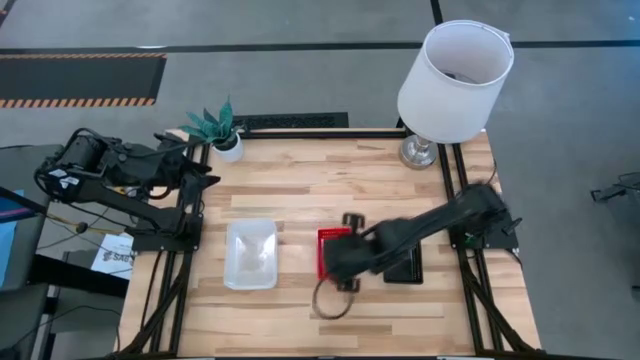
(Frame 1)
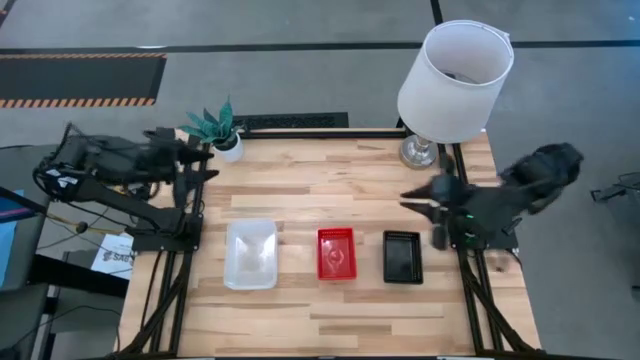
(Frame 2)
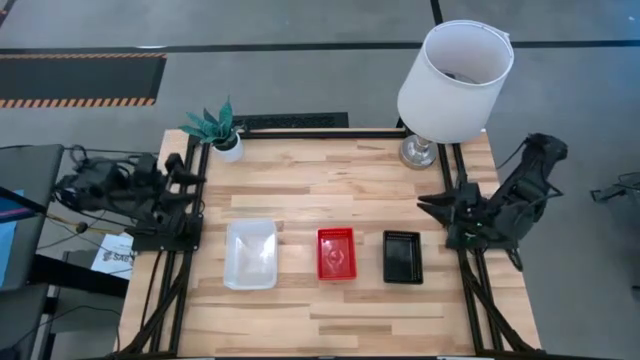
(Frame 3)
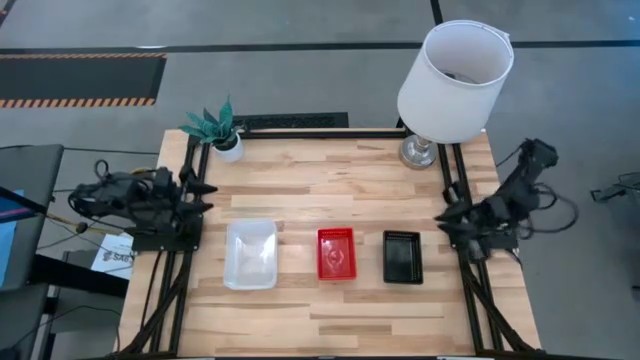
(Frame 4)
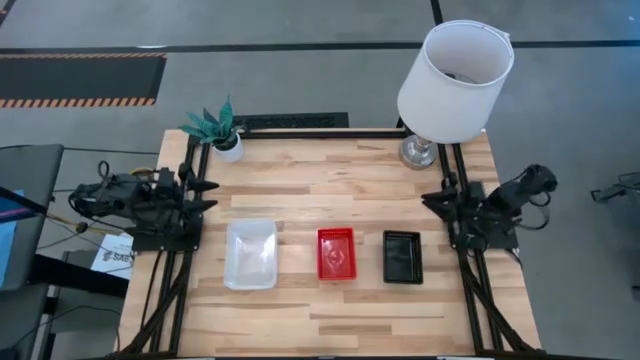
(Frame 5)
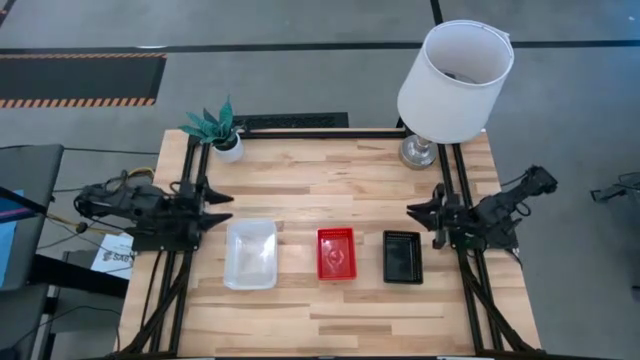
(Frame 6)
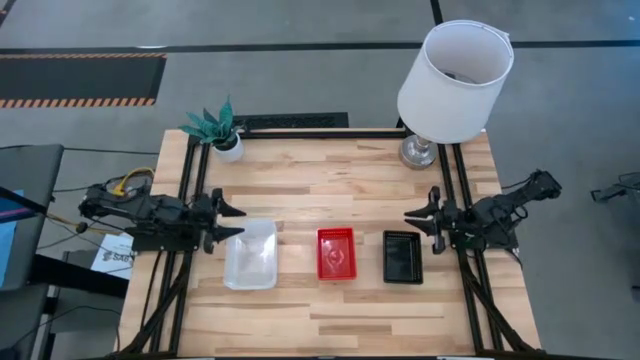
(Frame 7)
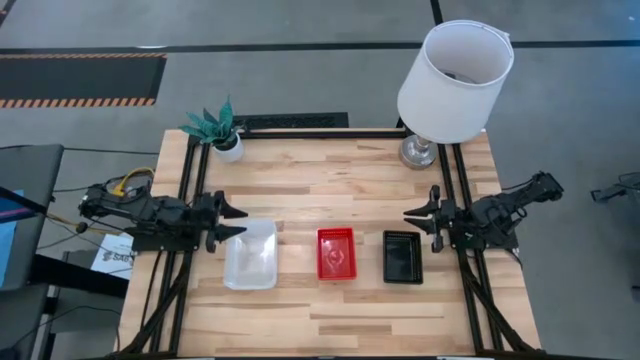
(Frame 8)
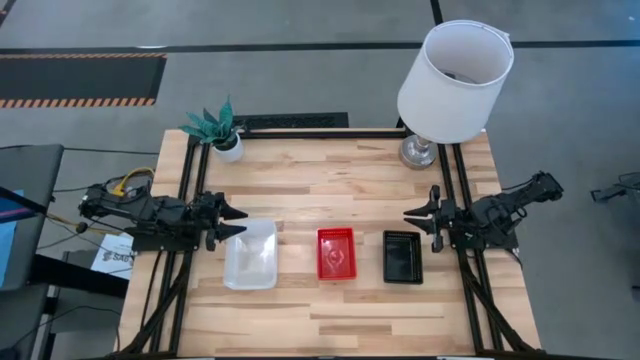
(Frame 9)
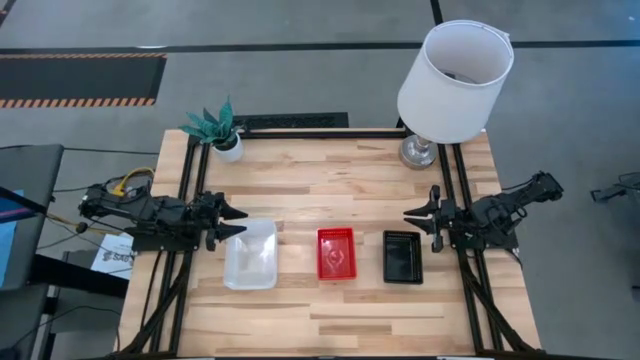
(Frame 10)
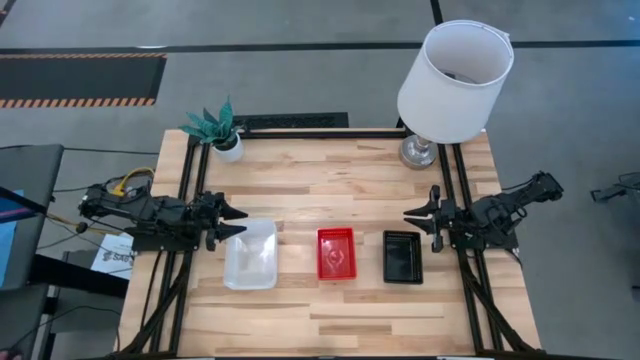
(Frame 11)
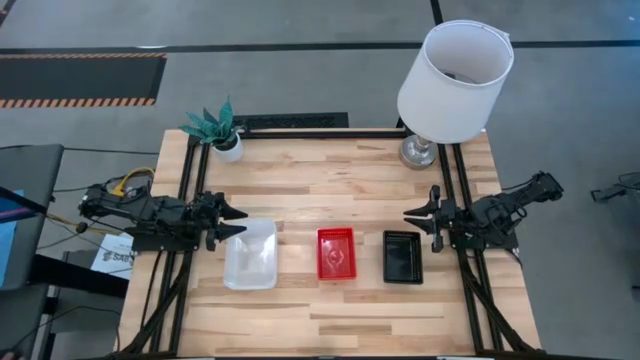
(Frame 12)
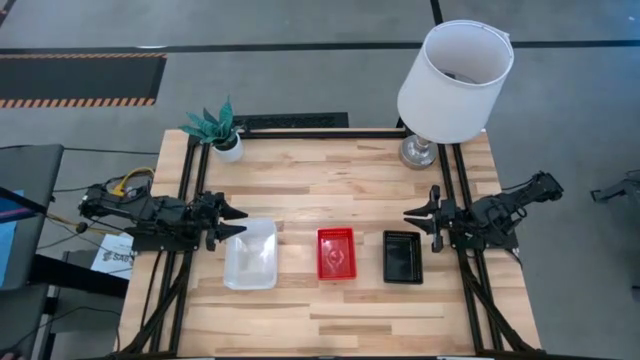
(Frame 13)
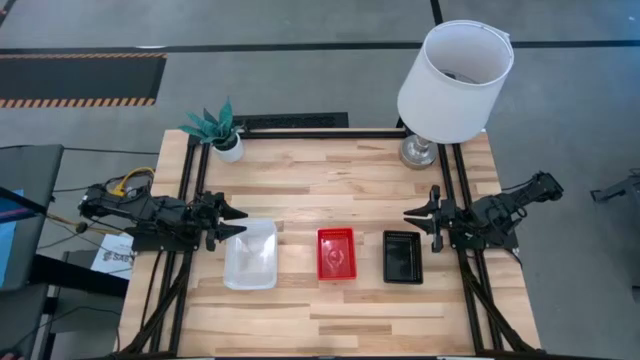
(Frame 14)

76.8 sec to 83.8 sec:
Return to Home Position
